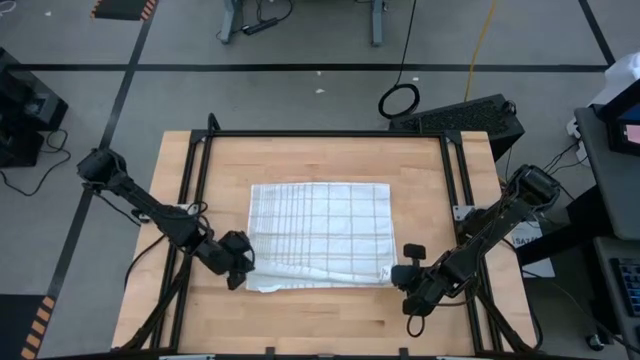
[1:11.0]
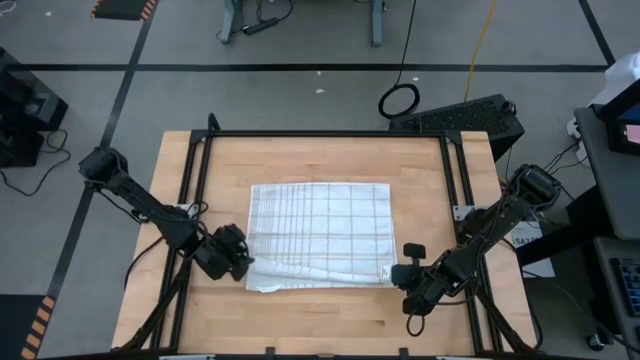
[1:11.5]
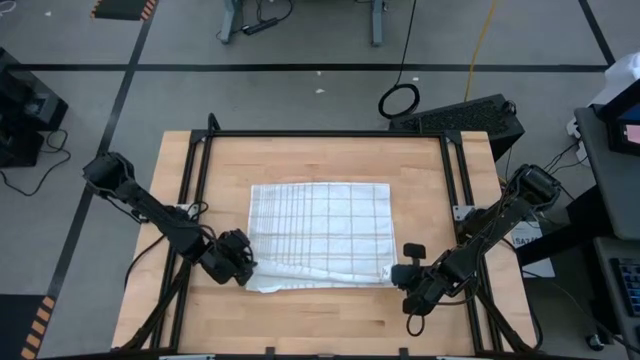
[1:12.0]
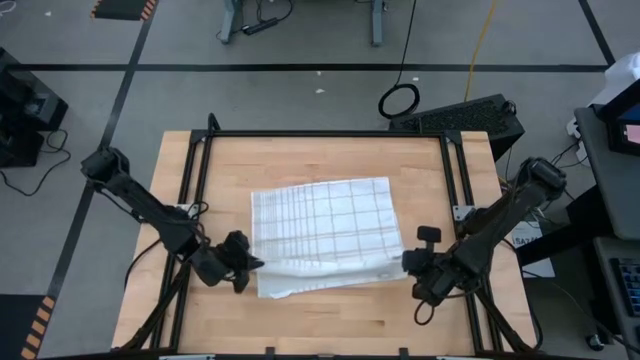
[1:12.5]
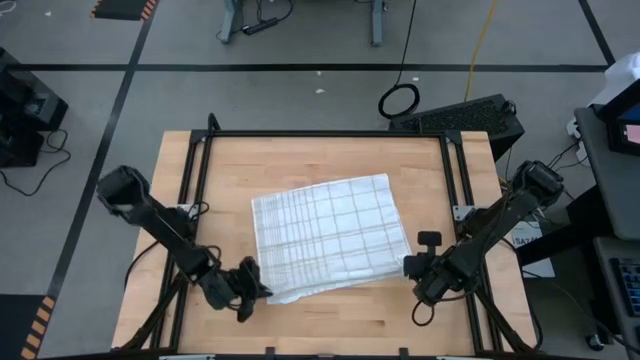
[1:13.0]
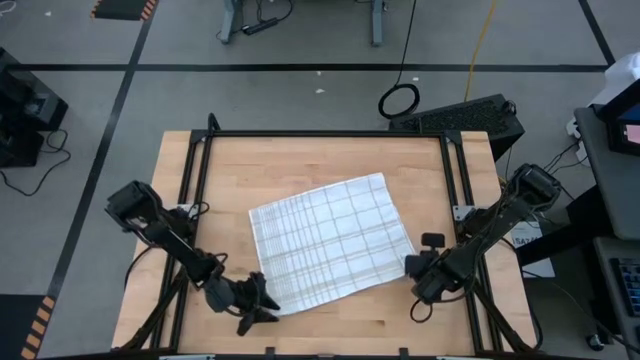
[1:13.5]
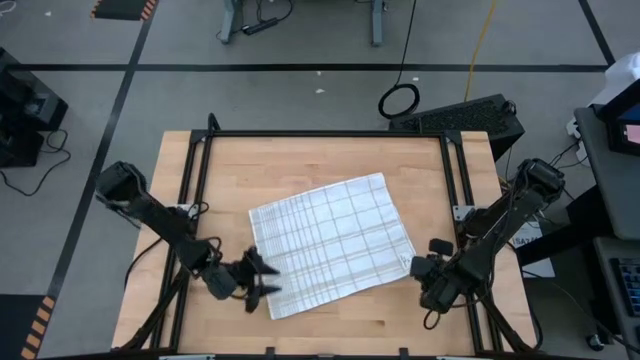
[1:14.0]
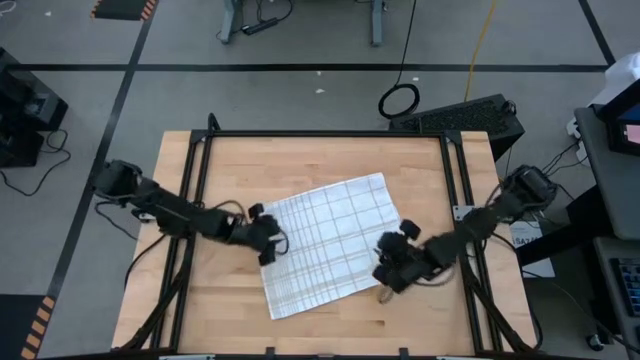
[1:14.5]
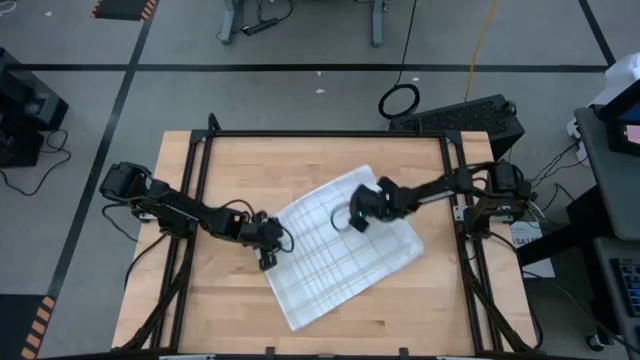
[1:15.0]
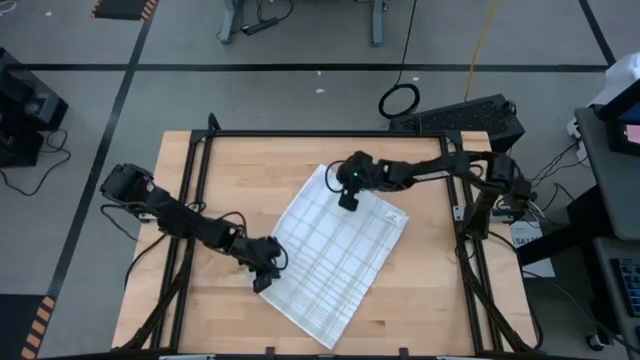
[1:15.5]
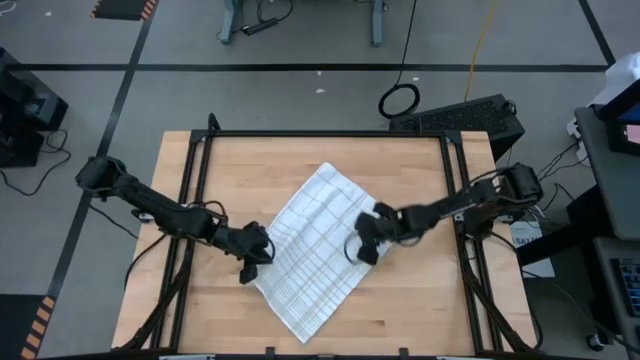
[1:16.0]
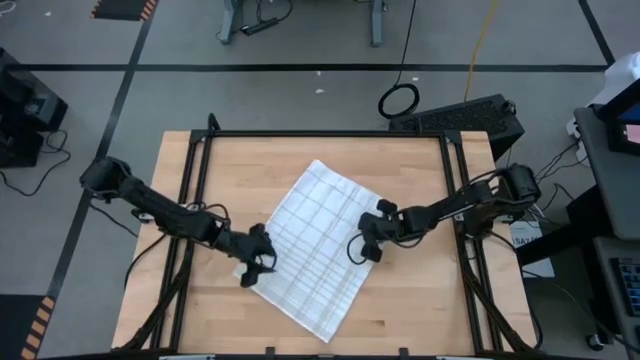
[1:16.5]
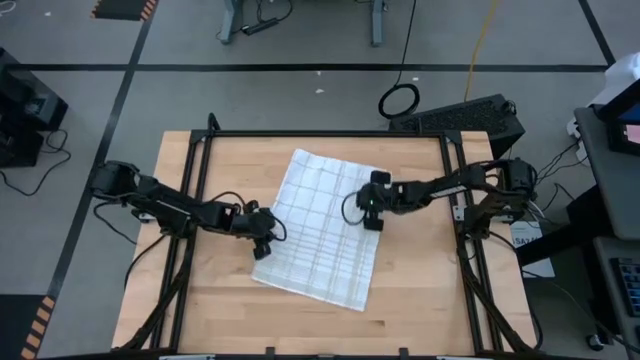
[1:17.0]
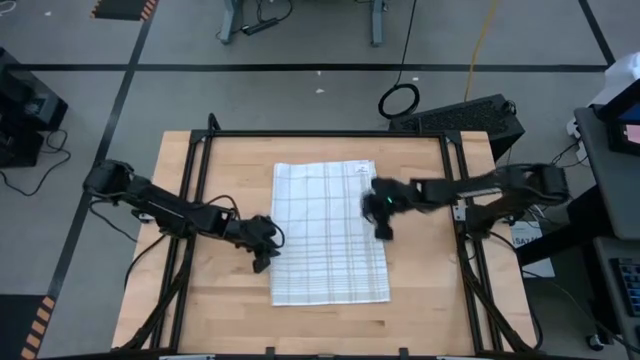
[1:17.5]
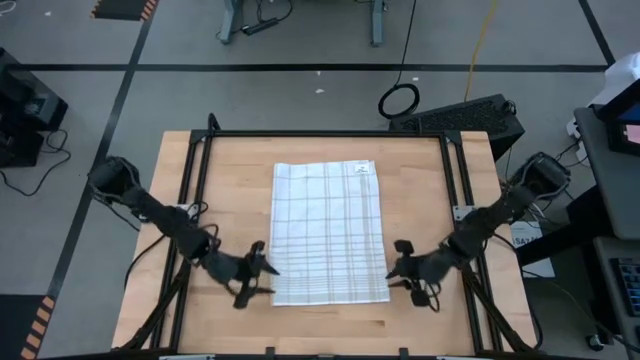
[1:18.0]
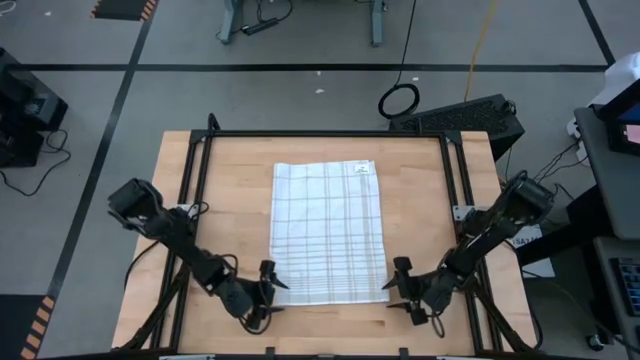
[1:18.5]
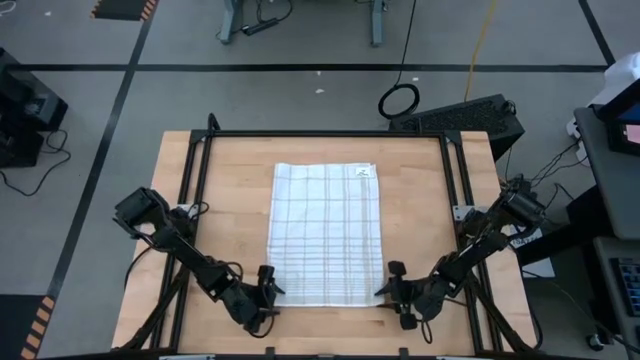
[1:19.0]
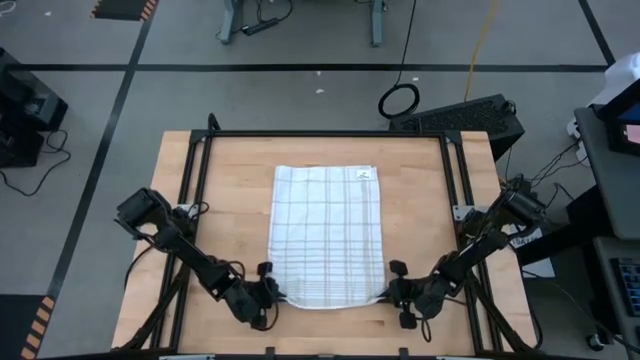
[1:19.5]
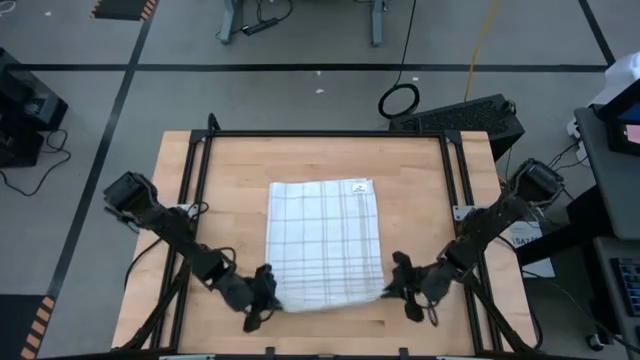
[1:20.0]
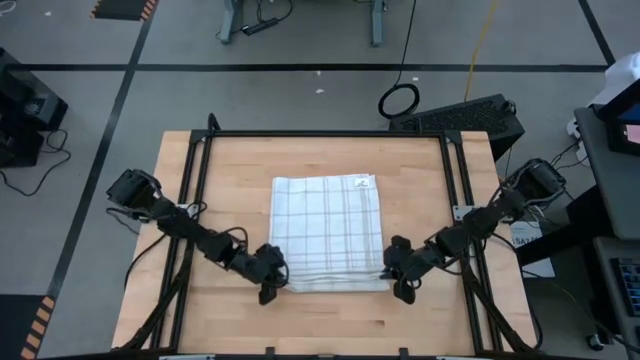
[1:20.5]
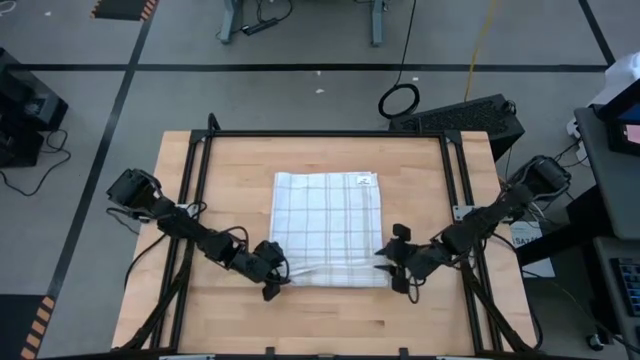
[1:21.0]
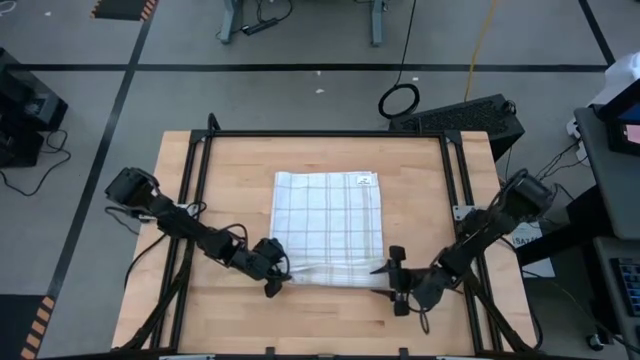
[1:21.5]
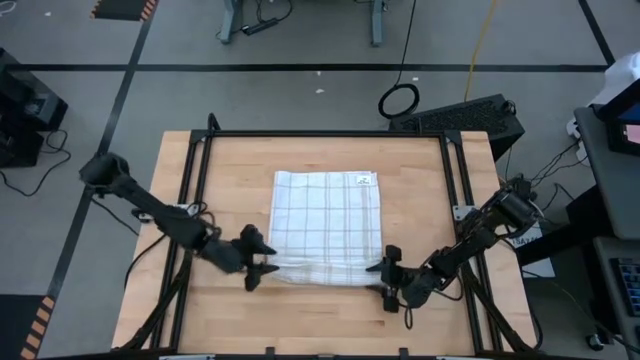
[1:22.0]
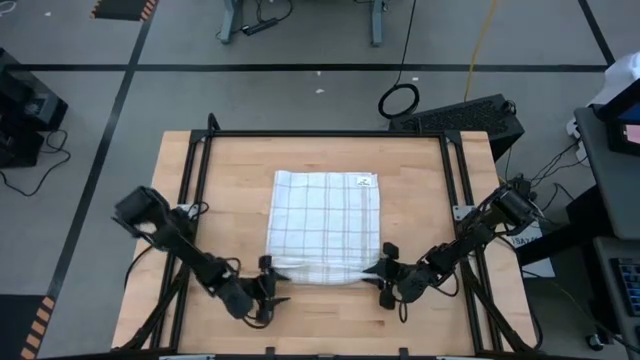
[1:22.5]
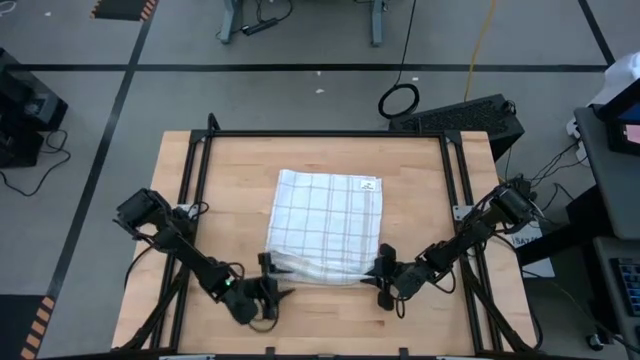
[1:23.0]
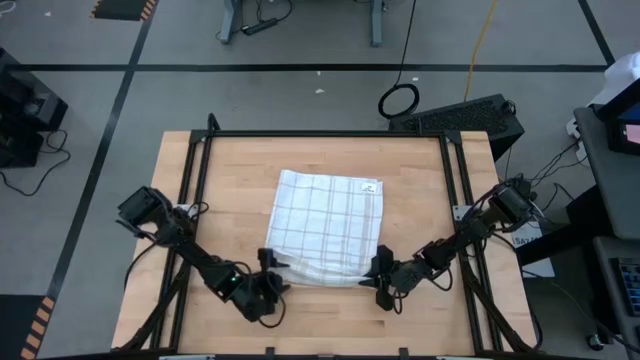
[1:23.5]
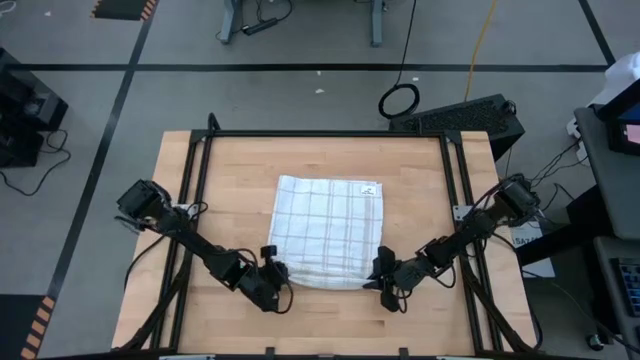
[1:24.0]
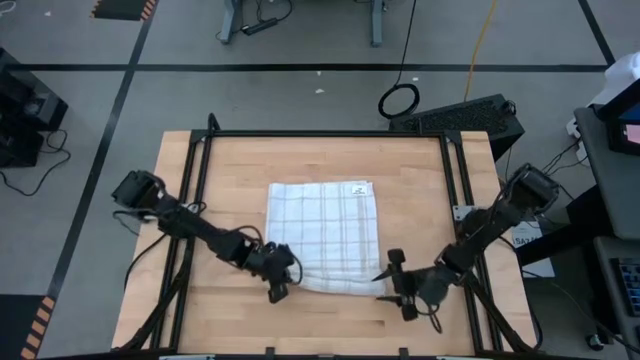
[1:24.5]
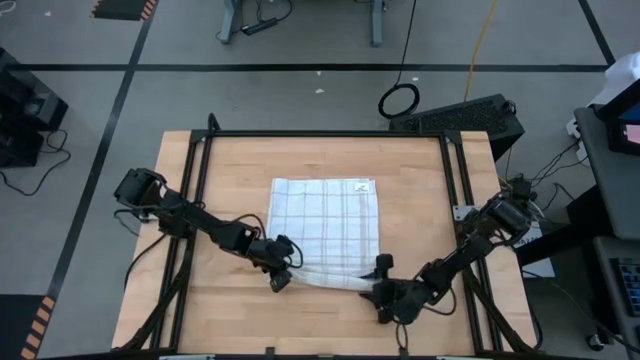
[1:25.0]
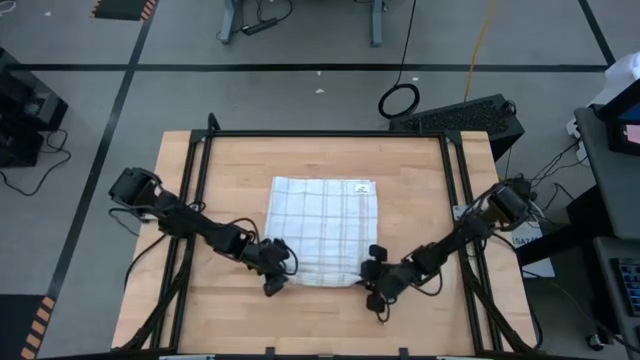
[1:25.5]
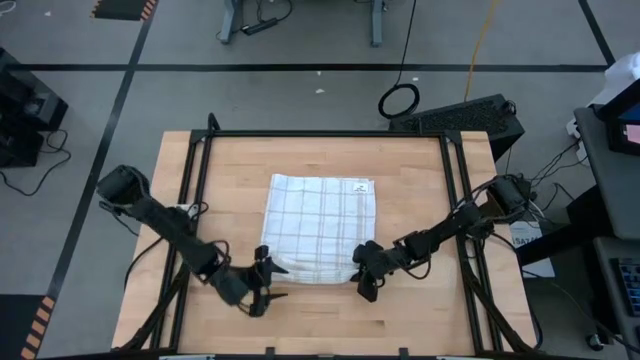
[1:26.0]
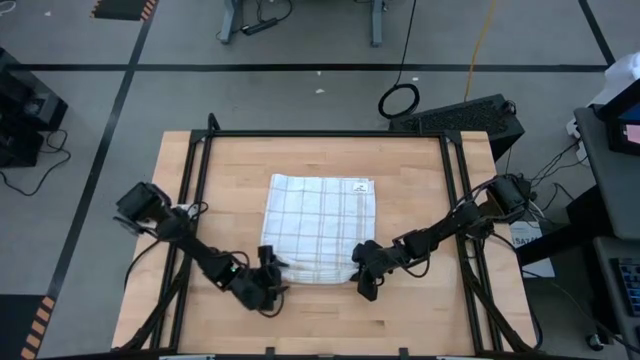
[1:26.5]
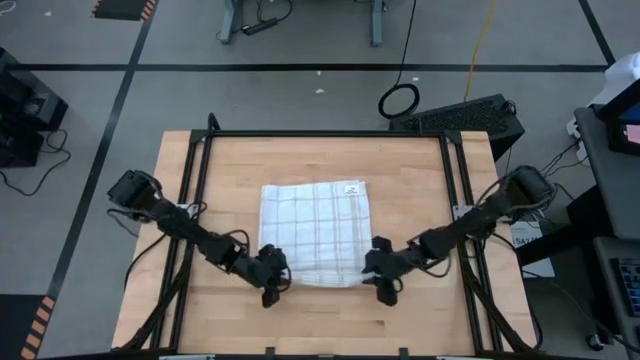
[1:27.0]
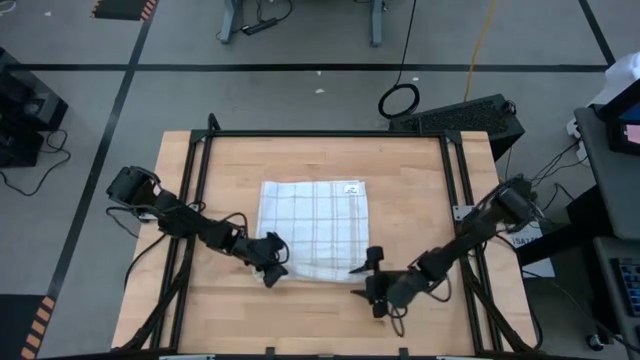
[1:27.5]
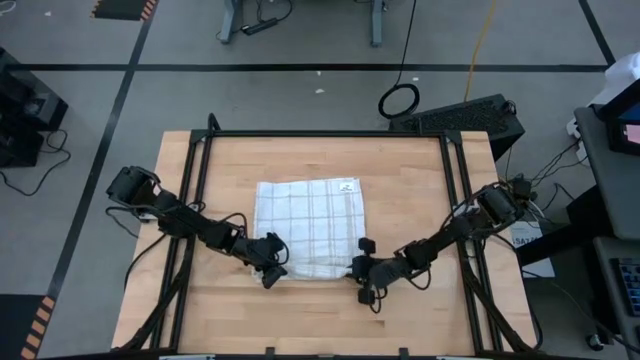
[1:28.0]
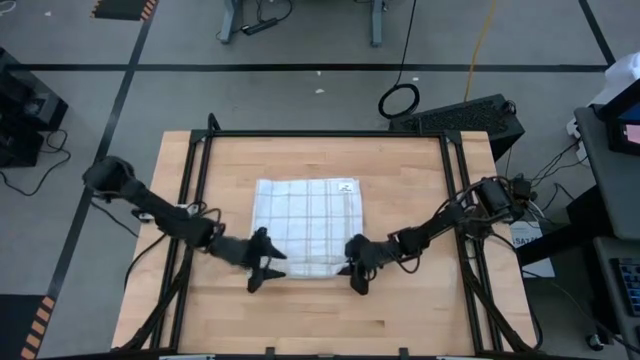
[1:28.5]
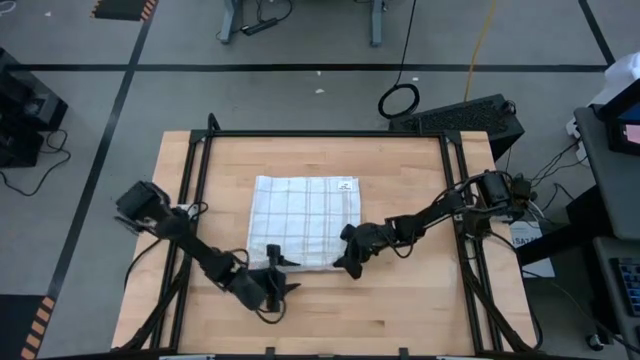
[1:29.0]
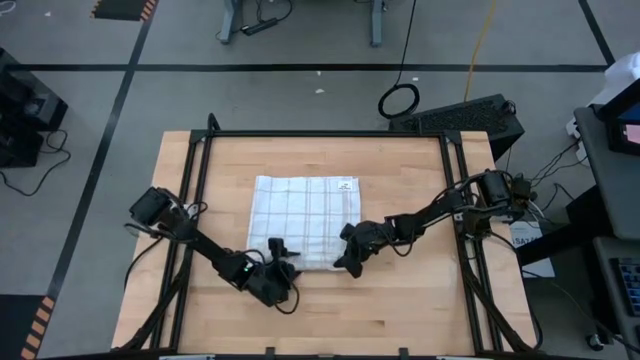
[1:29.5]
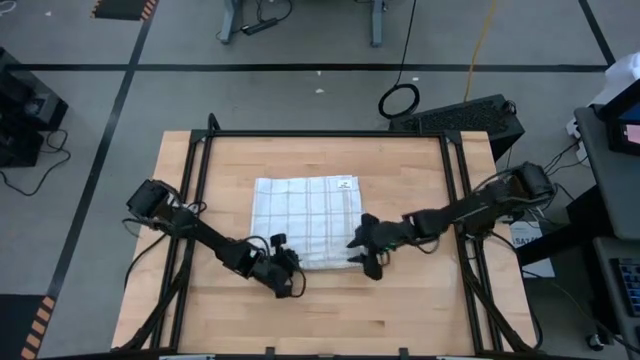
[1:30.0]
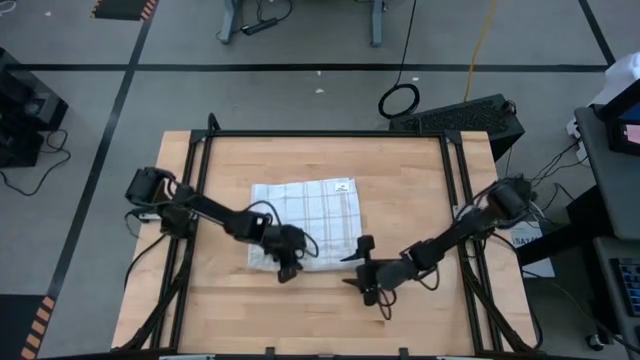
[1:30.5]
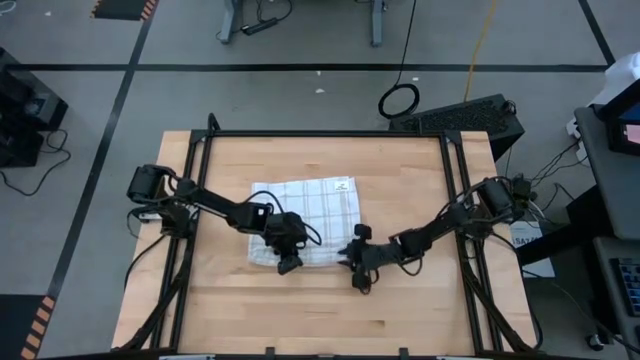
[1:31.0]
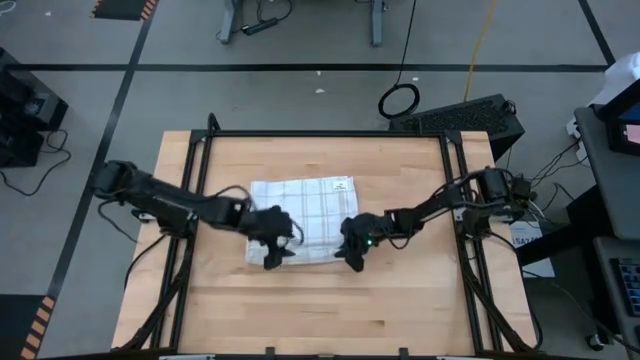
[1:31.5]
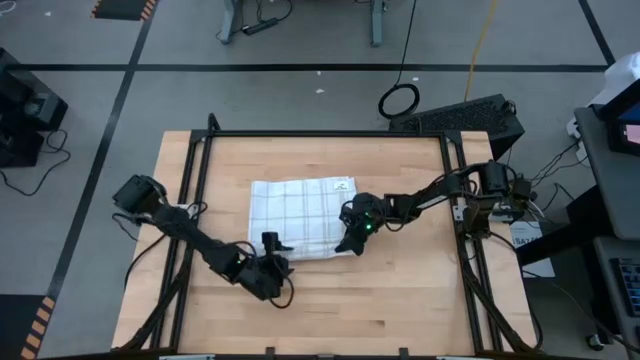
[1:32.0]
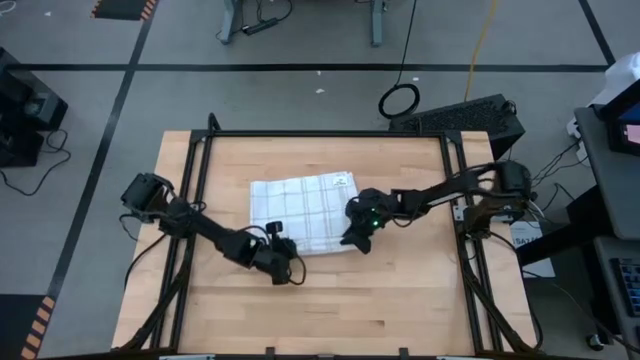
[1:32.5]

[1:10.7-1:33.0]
Task: Roll towel
Roll the white towel
